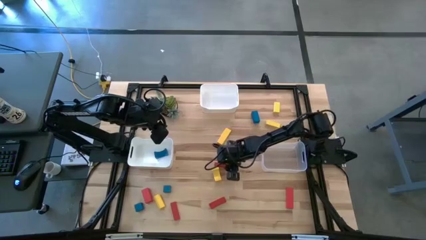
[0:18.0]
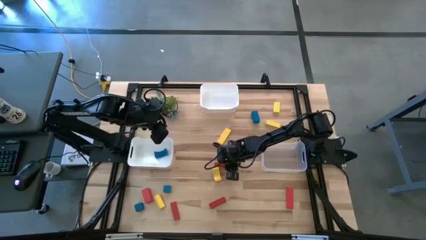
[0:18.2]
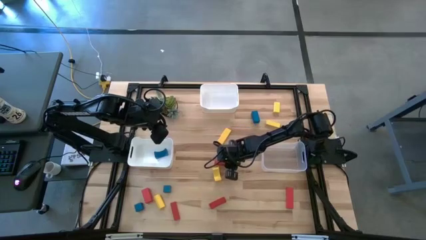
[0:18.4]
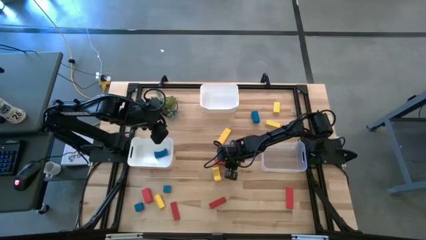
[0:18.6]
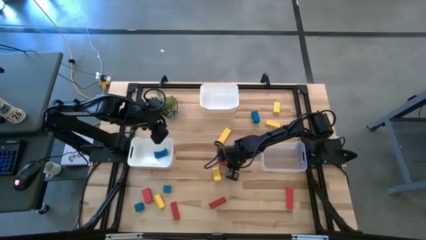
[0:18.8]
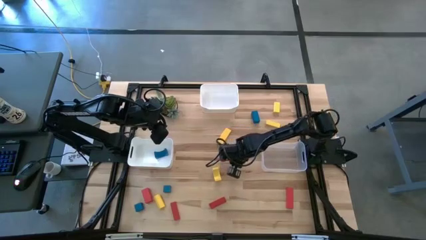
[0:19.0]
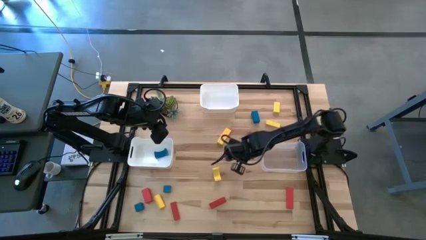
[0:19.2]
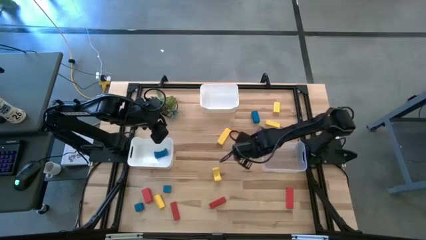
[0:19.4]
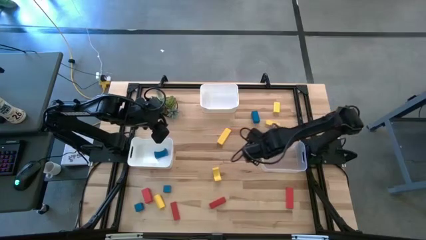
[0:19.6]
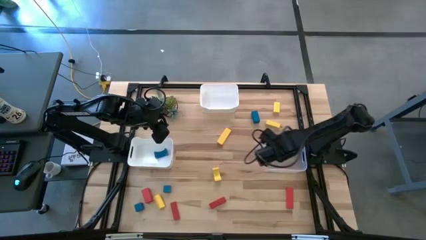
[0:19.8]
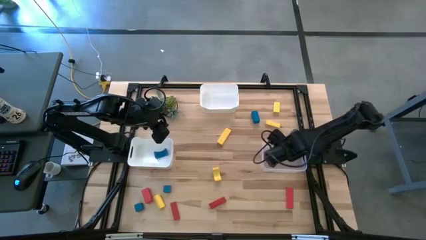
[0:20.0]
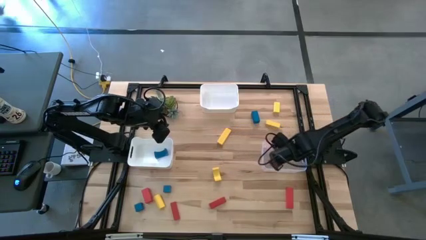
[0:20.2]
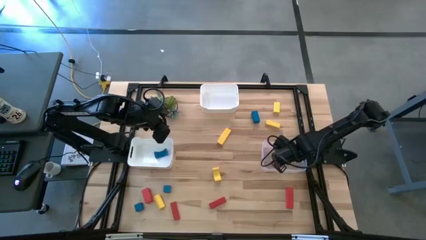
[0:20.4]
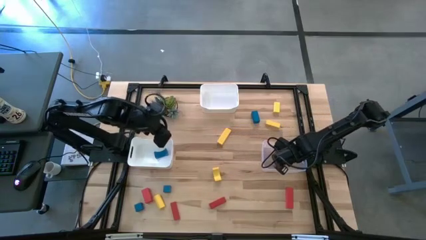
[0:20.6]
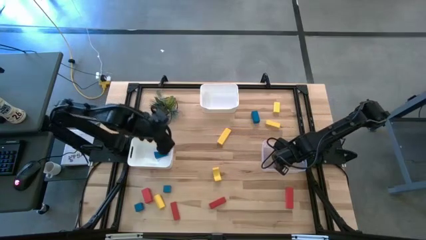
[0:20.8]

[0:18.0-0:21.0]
Task: Sort & place blocks by color
Put the top red block into the bottom right transparent bin

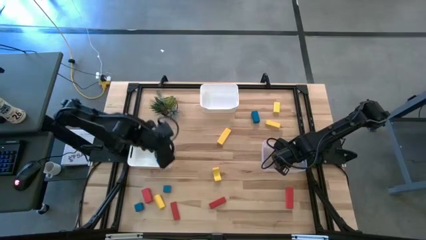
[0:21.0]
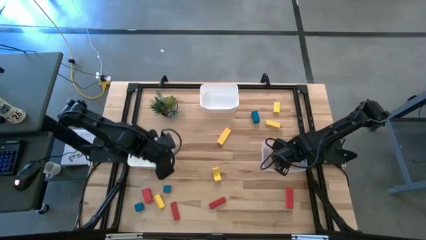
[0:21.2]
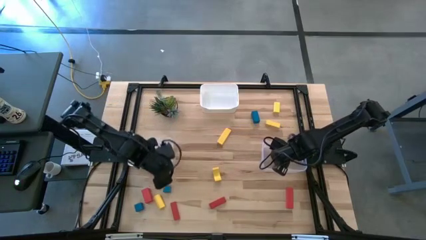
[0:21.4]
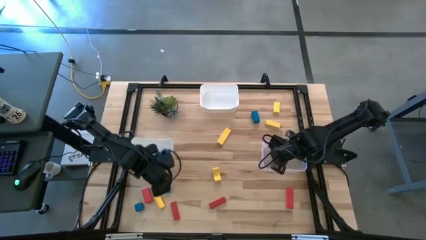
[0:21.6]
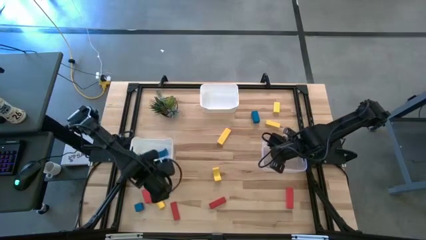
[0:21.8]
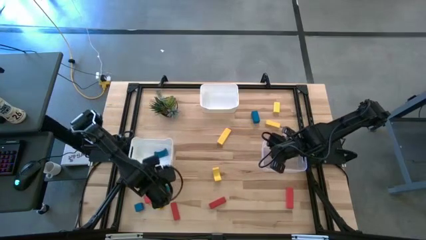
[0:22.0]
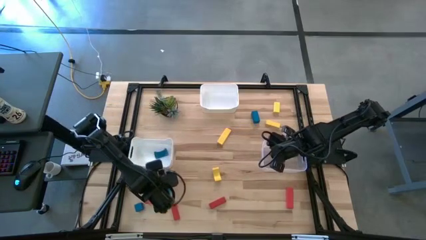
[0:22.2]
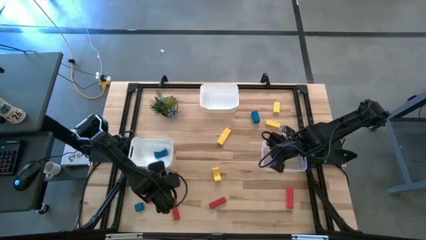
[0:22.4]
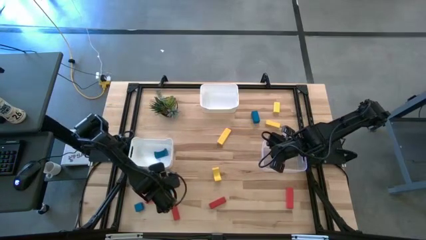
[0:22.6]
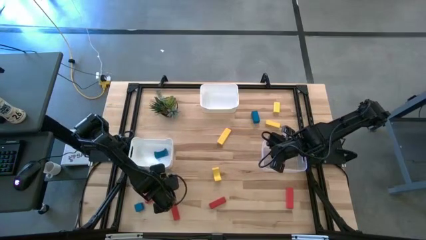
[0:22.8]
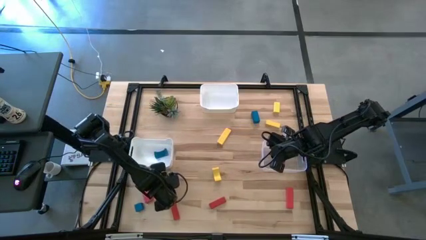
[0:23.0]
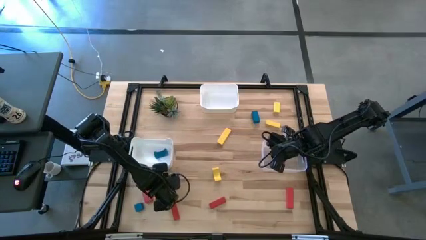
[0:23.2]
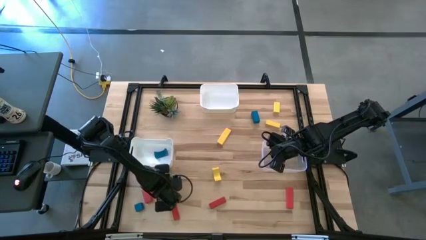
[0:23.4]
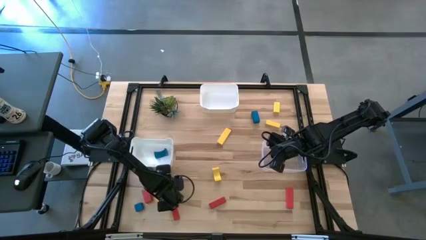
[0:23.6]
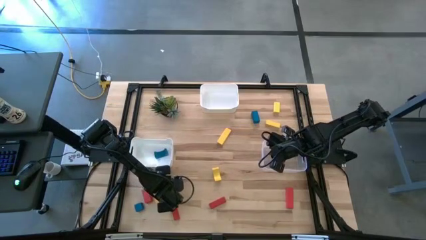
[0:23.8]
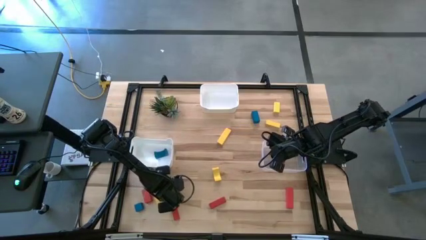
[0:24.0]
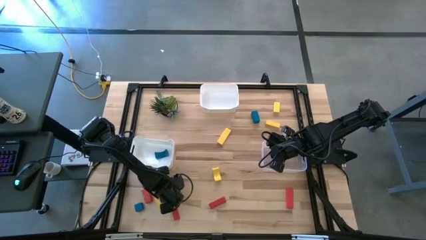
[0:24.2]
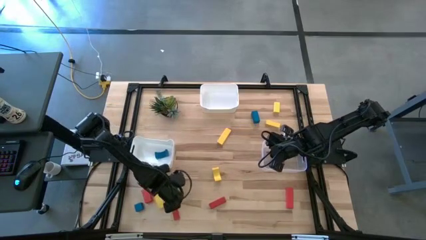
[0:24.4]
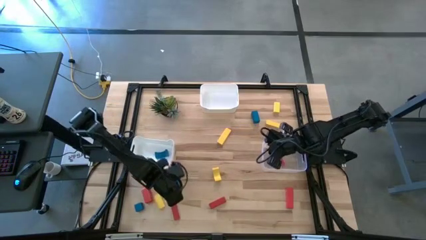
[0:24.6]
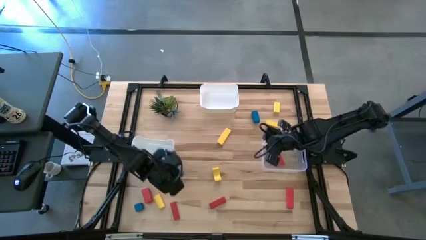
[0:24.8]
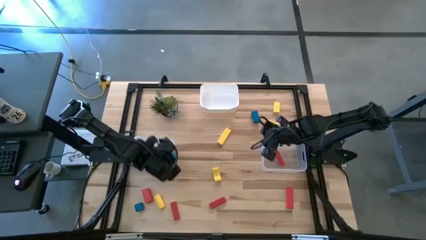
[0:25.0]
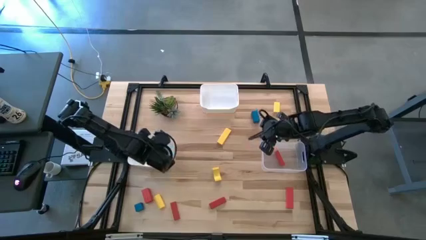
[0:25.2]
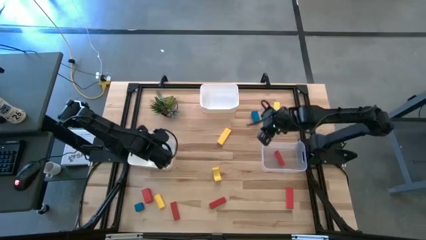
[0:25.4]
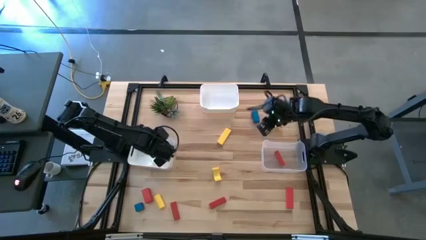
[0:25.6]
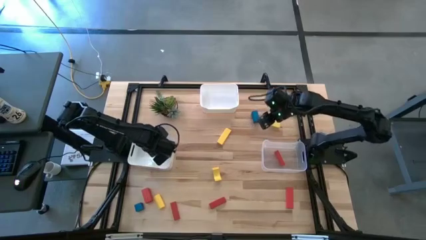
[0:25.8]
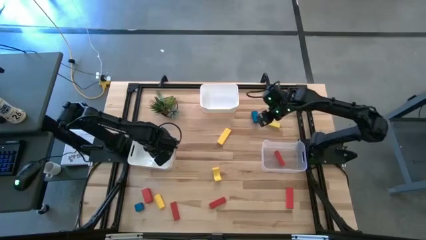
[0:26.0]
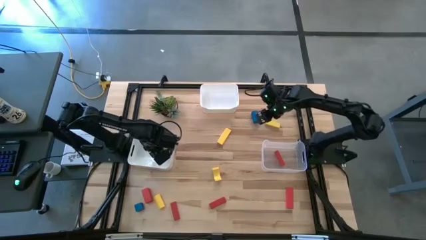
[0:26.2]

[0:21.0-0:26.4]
Put the bottom left blue block into the bottom left white bin

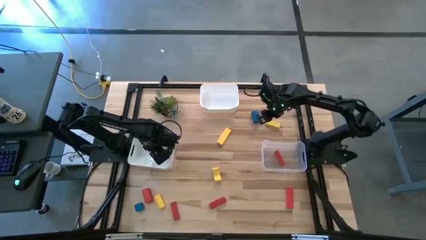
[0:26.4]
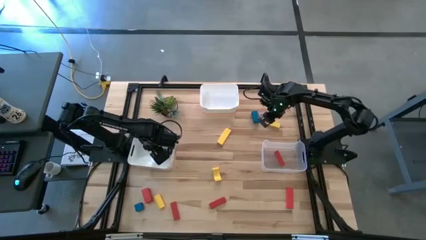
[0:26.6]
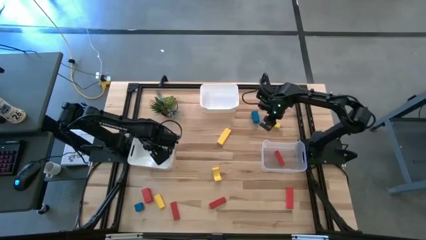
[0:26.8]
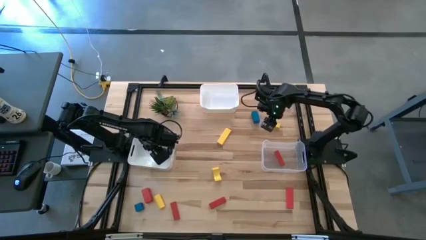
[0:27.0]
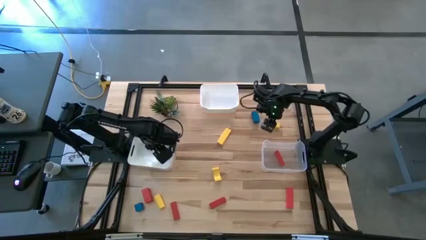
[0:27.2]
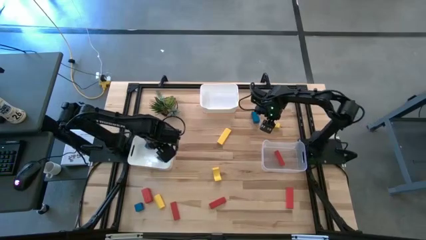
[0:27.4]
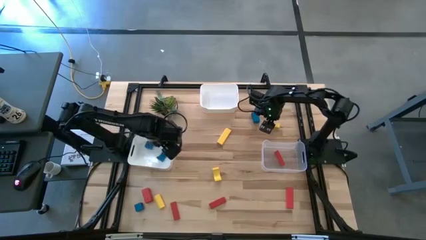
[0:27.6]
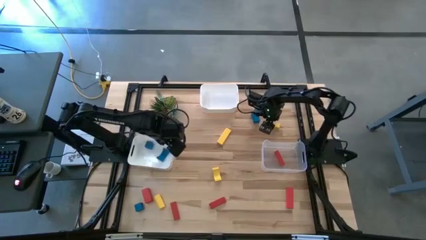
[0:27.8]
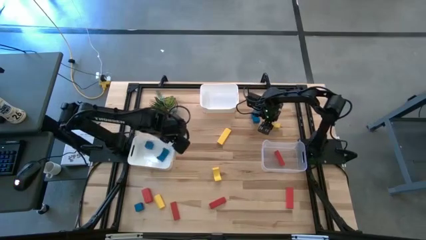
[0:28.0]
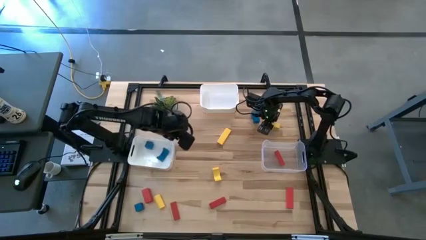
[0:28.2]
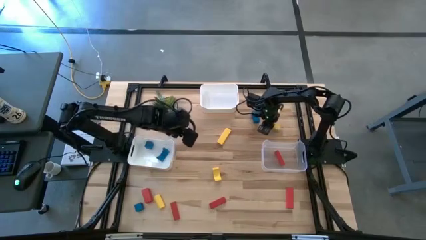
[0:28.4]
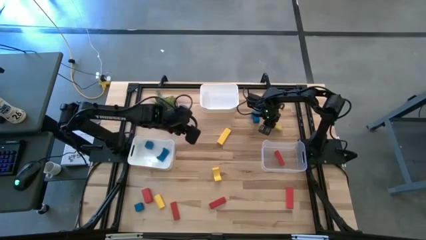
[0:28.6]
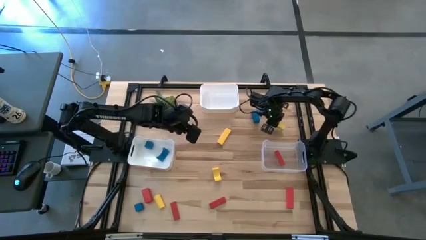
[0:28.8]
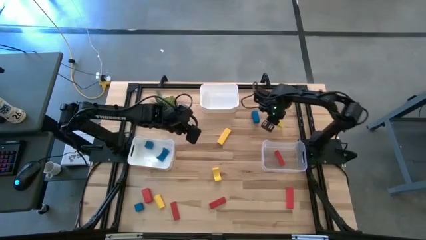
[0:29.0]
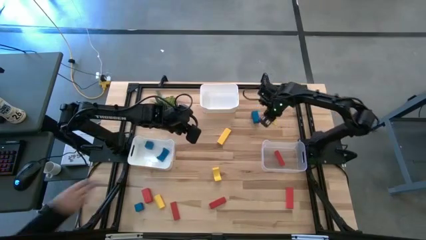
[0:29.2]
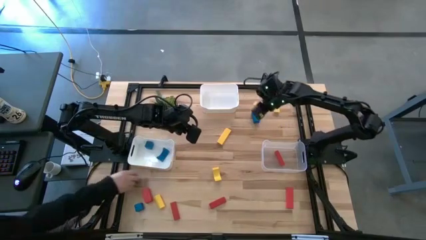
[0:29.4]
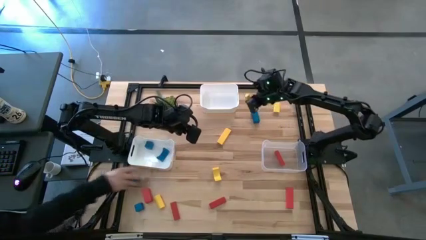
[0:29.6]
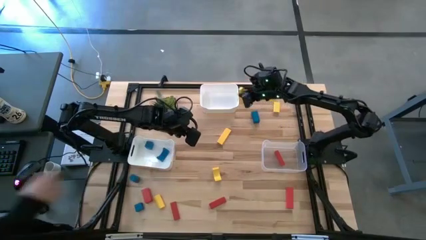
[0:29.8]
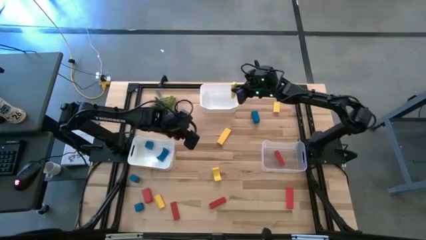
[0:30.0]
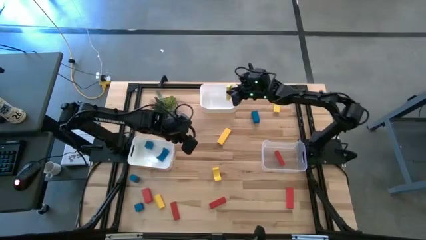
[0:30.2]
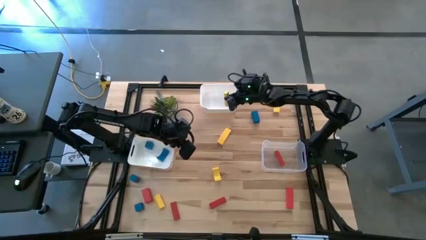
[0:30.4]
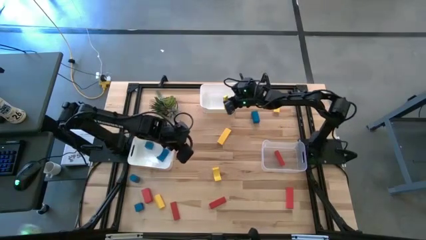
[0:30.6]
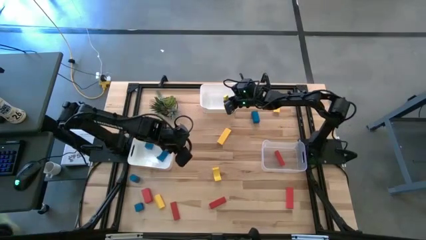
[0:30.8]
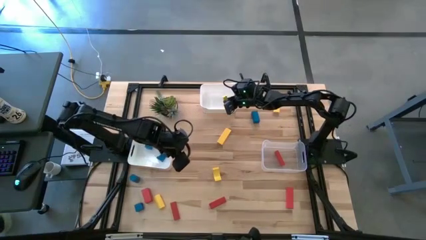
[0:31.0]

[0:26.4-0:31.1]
Put the top right yellow block into the top white bin

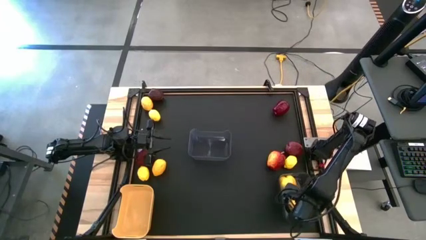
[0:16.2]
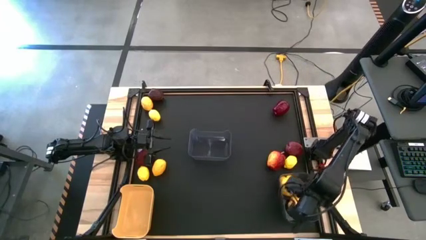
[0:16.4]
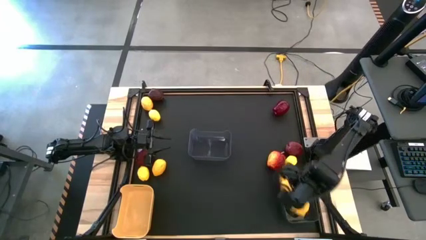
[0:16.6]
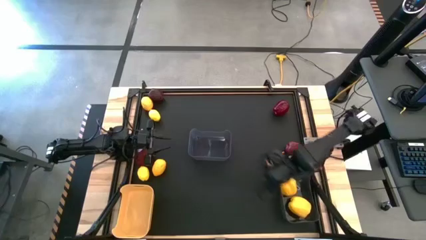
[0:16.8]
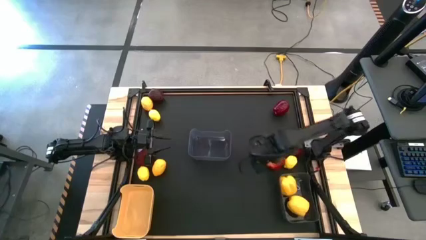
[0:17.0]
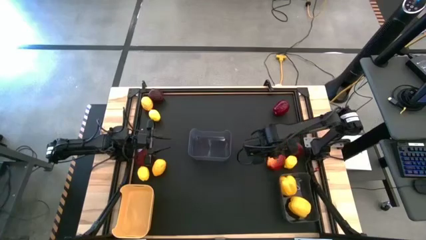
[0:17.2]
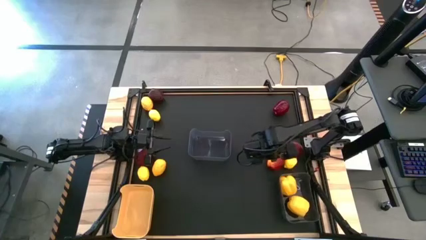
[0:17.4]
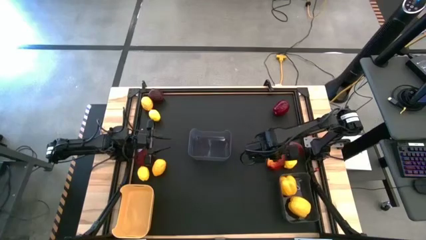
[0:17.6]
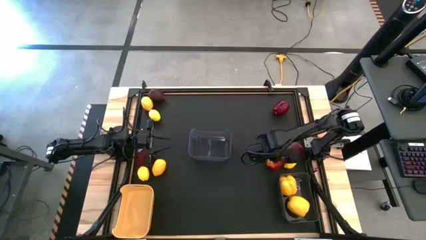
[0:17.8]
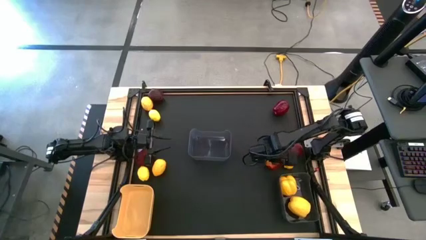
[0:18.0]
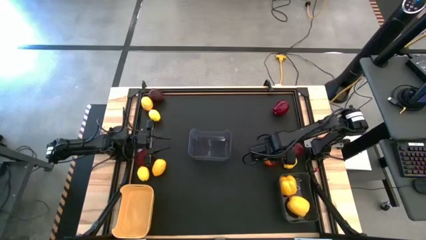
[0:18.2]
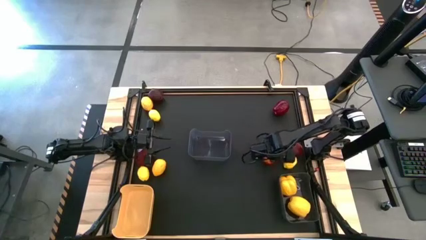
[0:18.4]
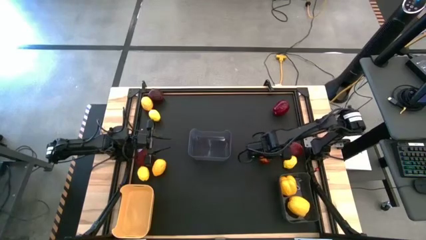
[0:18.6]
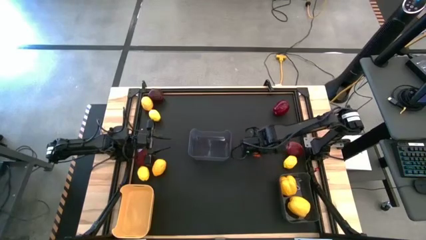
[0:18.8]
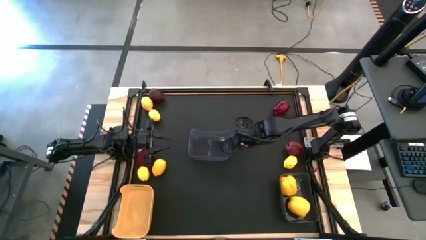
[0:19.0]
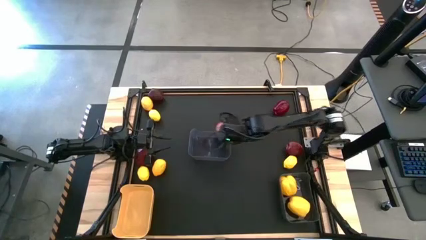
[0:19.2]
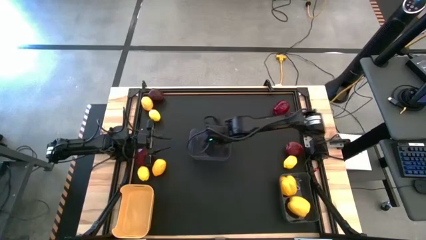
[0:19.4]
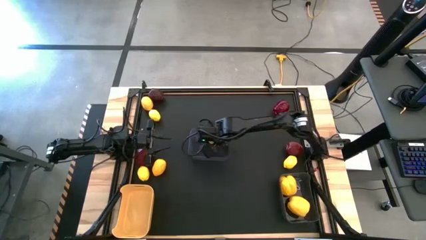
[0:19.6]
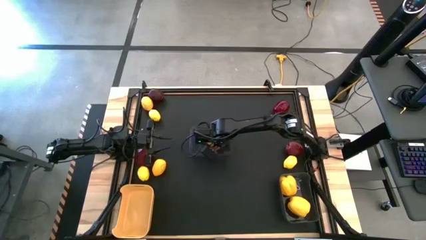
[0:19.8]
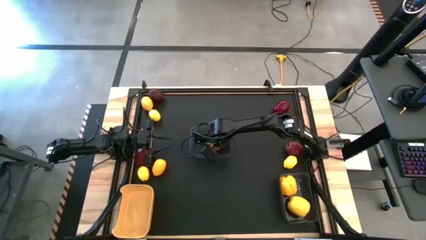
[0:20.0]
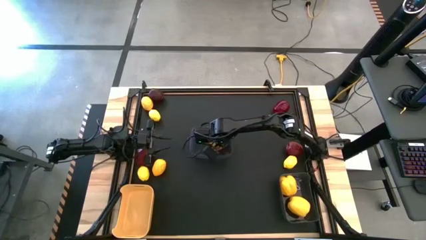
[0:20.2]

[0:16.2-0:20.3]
Task: Sort produce into baskets
Put the red apple into the top black bin
